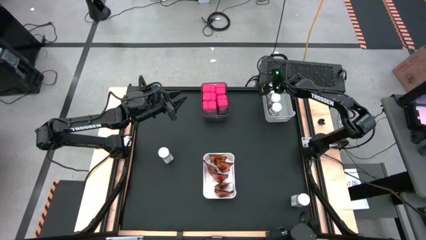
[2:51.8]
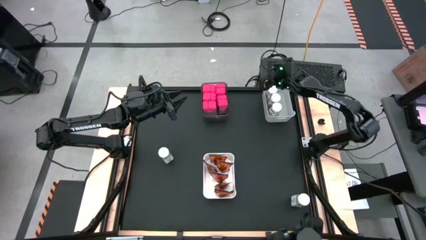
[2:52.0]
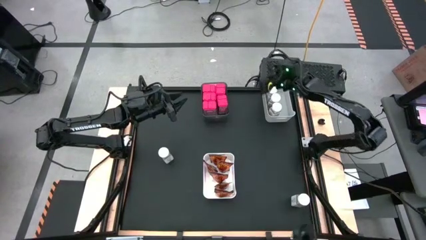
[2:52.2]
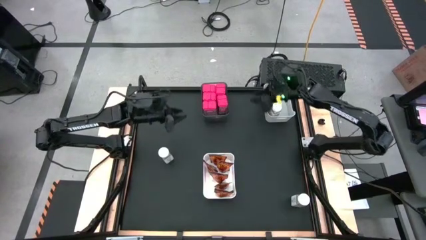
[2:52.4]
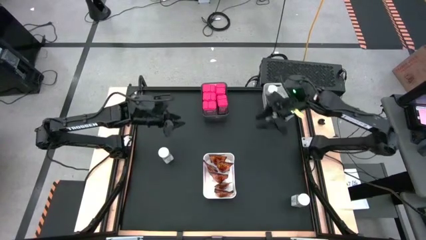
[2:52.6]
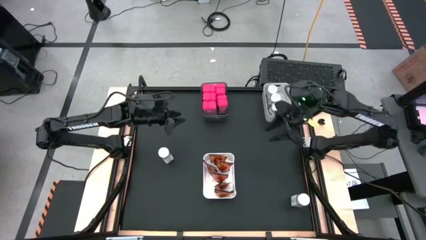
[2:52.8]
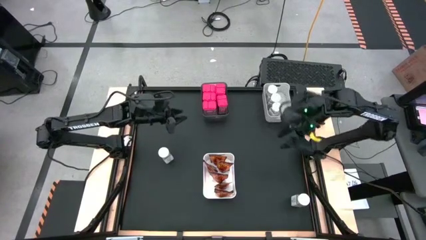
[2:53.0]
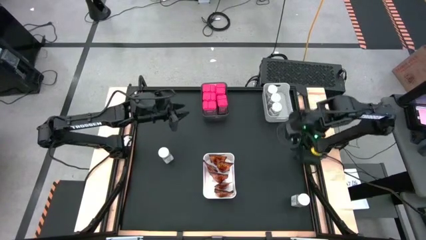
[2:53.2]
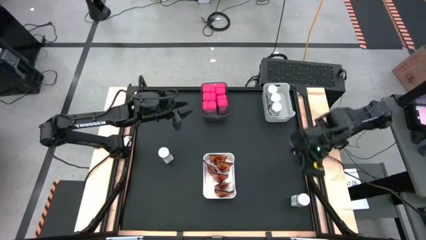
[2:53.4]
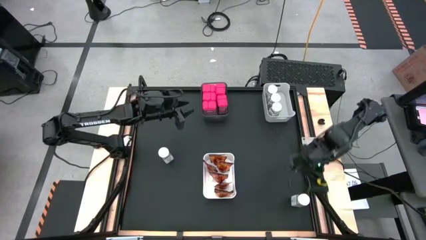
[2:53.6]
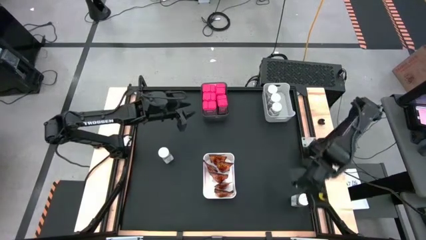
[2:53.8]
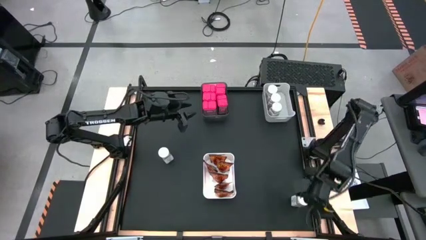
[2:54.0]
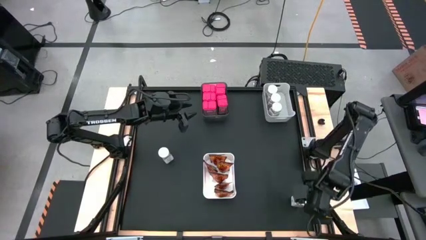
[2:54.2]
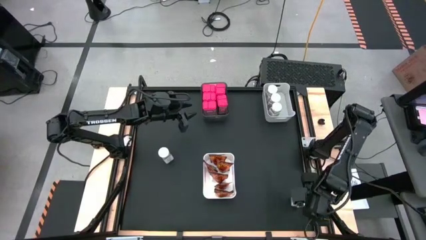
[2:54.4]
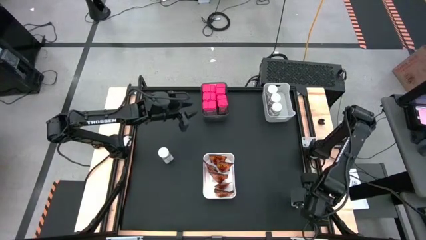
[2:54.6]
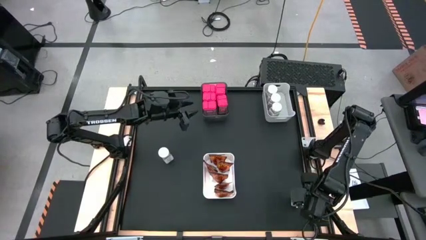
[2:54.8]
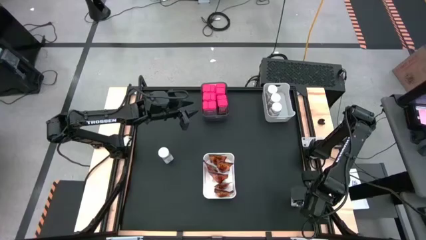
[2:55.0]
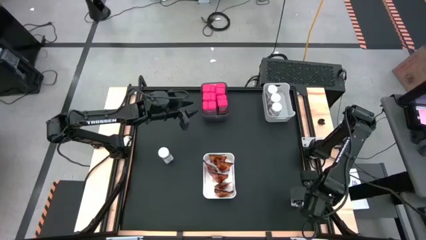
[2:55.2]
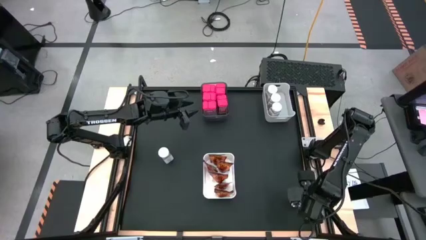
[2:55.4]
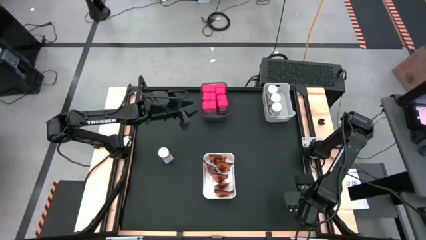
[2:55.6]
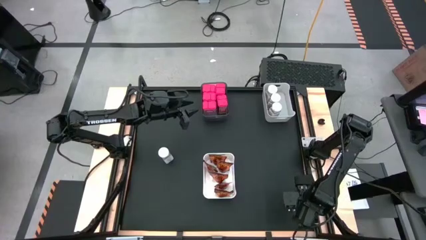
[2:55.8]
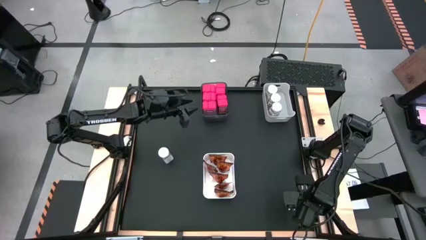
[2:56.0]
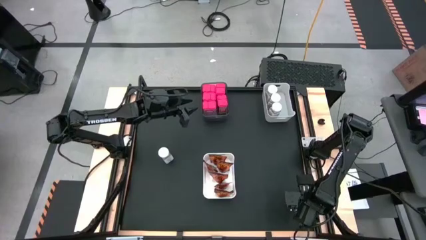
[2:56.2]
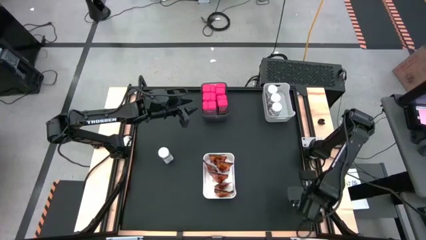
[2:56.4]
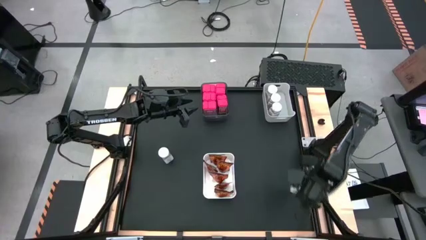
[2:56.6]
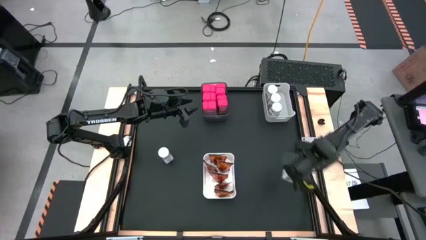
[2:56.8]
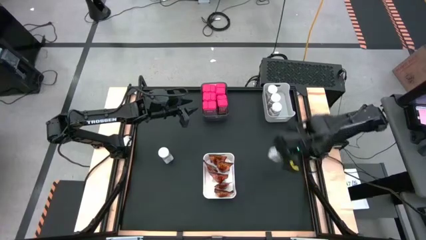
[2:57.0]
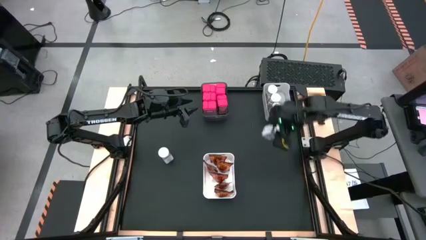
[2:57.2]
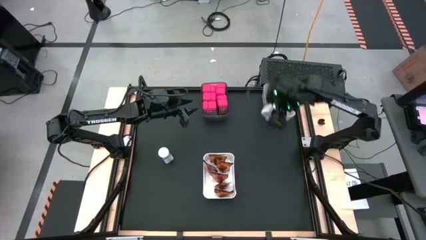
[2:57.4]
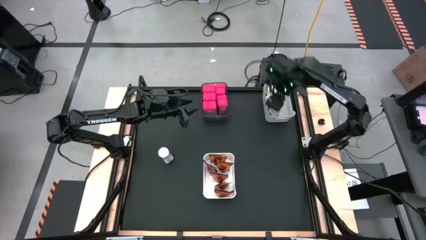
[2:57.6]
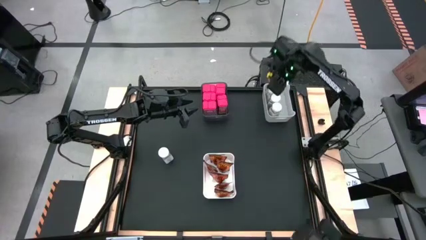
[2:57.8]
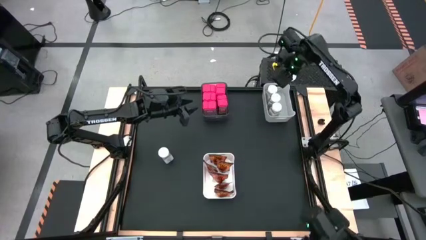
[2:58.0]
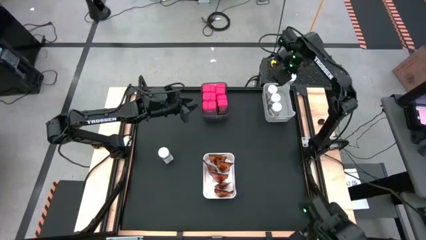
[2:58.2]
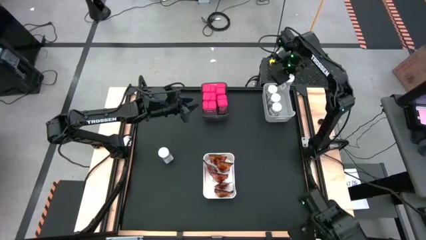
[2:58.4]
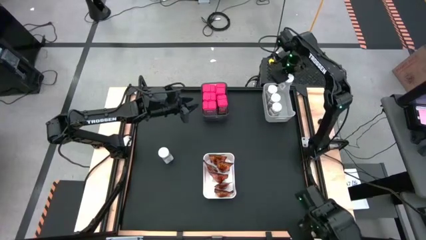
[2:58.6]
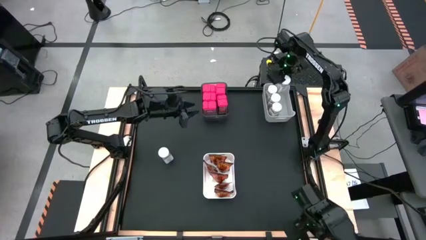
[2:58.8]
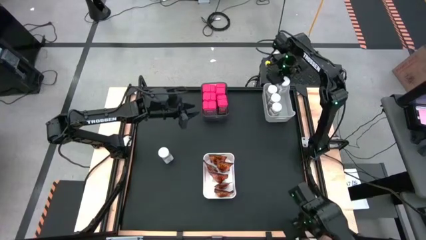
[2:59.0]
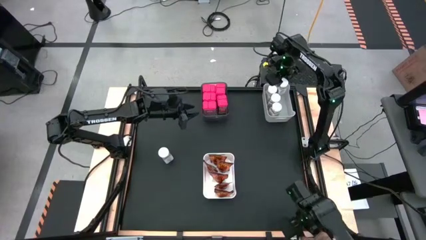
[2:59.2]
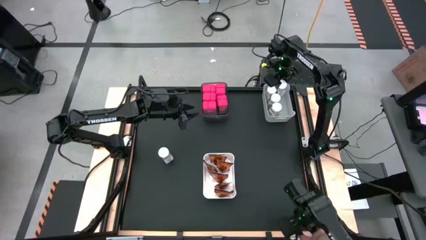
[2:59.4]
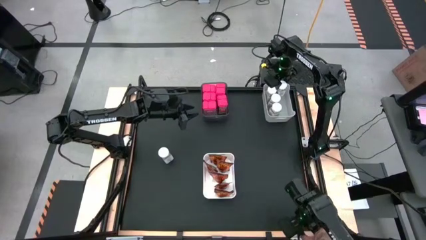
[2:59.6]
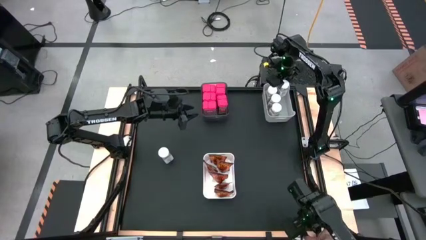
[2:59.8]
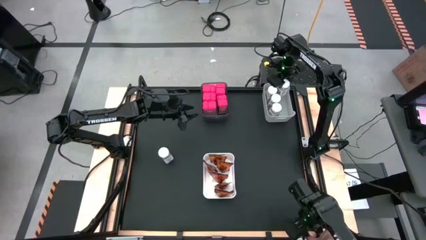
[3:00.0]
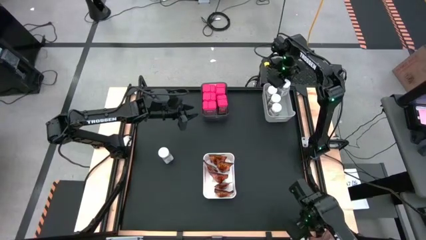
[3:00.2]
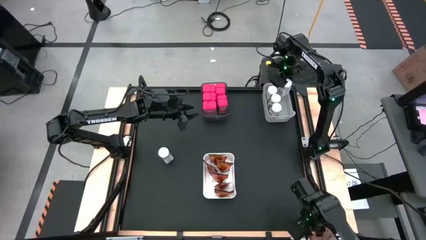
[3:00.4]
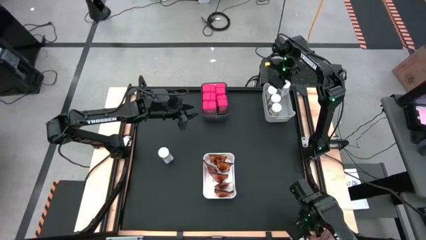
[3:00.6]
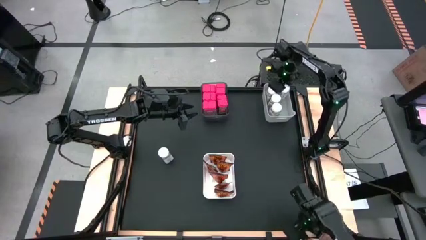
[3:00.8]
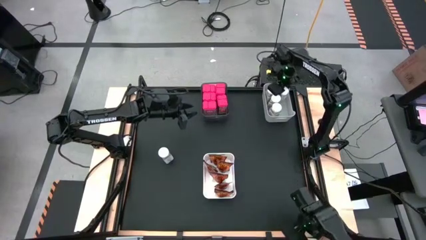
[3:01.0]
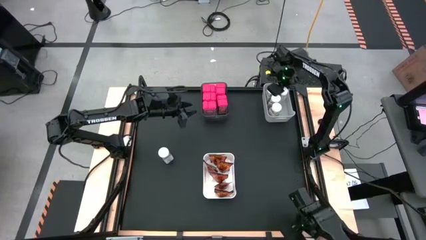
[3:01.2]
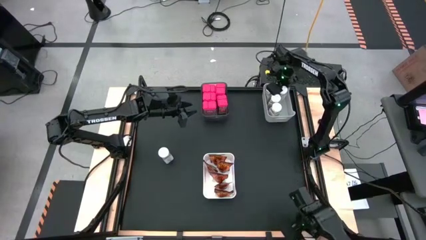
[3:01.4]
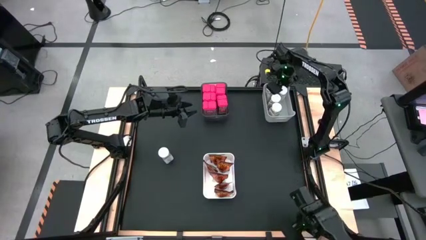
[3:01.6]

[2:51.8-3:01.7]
Task: Sort spices by type
Put the white seasoning bottle into the gray bin

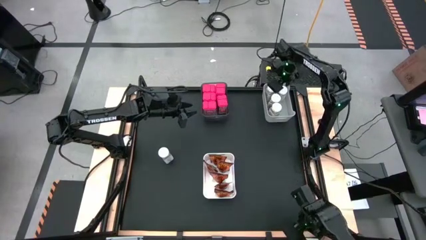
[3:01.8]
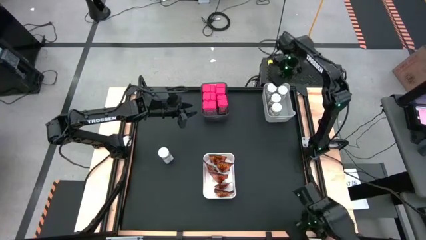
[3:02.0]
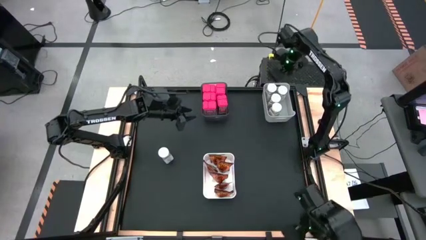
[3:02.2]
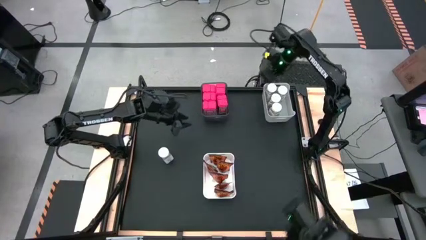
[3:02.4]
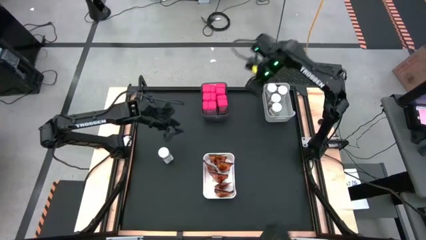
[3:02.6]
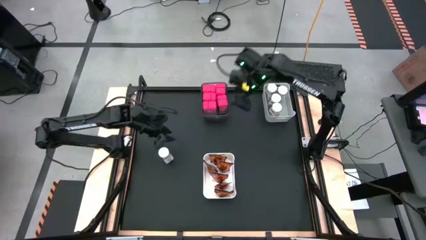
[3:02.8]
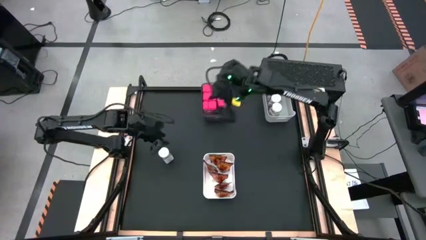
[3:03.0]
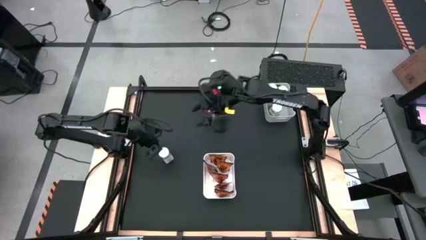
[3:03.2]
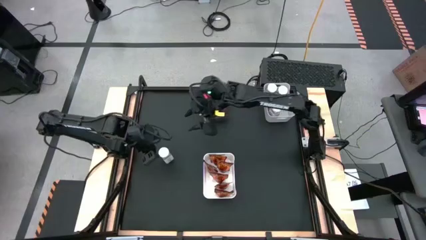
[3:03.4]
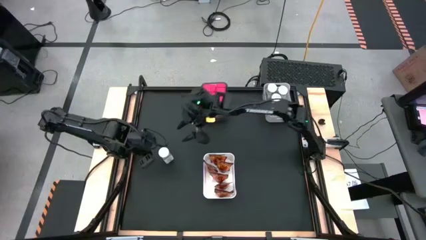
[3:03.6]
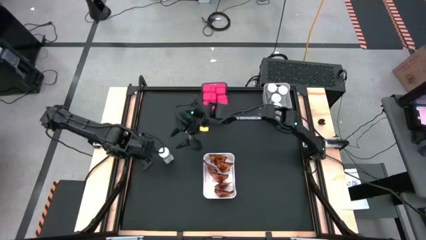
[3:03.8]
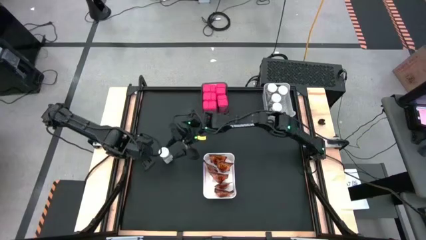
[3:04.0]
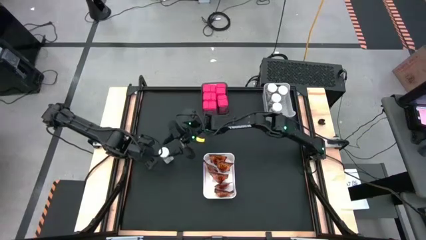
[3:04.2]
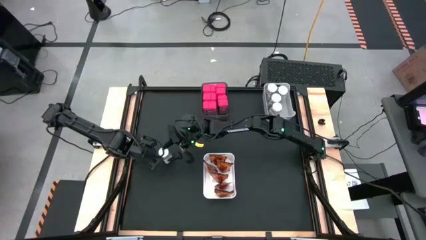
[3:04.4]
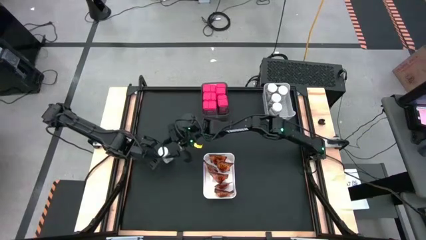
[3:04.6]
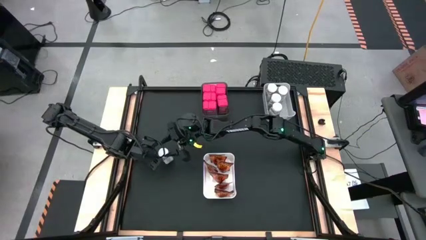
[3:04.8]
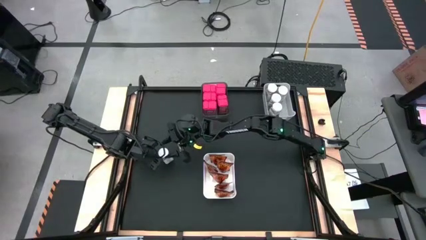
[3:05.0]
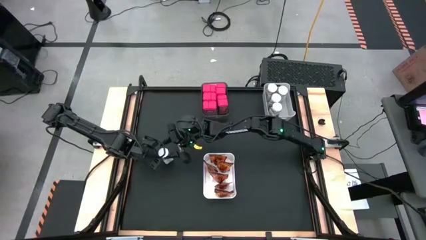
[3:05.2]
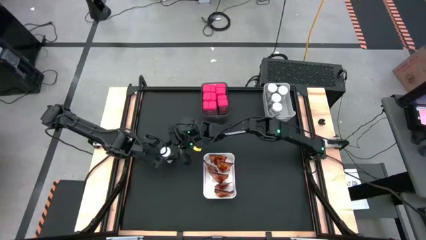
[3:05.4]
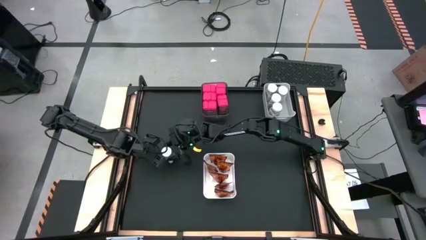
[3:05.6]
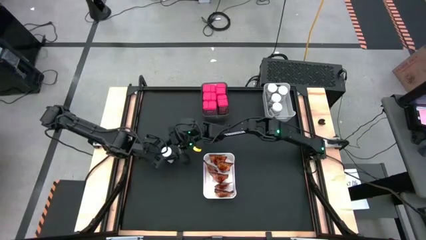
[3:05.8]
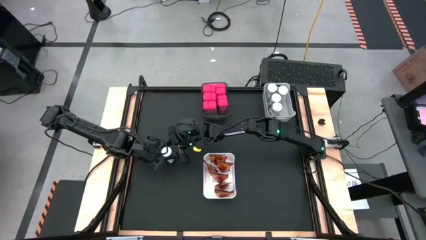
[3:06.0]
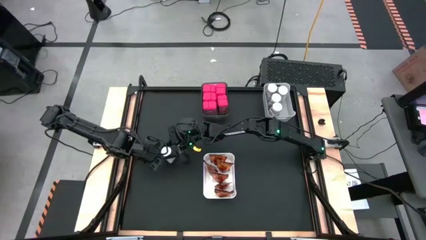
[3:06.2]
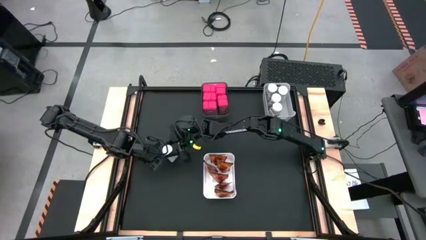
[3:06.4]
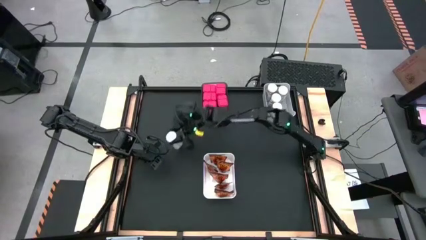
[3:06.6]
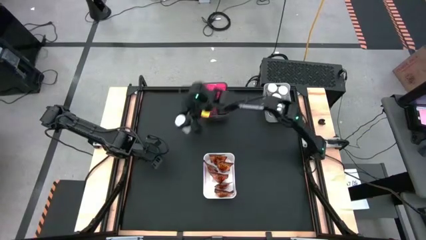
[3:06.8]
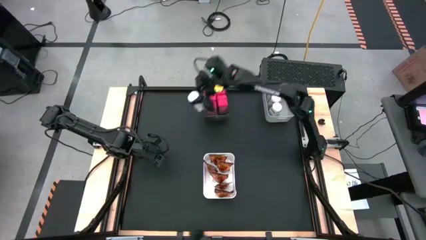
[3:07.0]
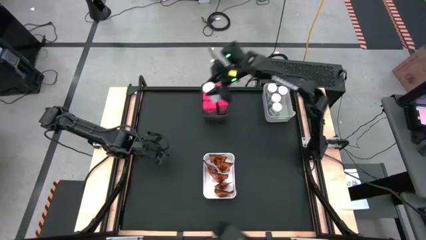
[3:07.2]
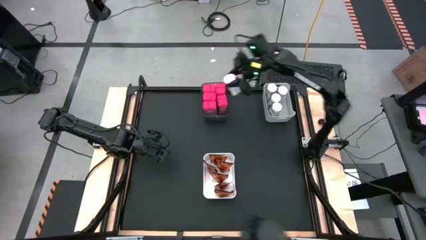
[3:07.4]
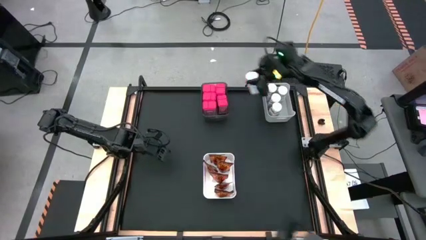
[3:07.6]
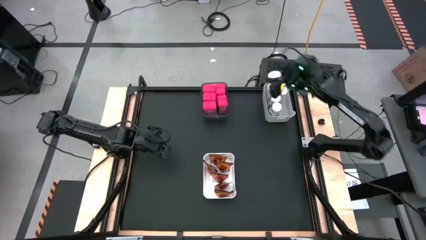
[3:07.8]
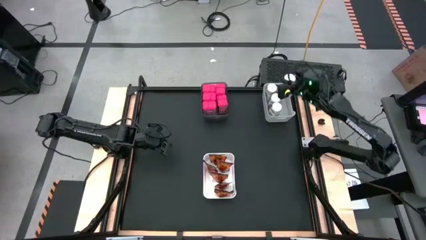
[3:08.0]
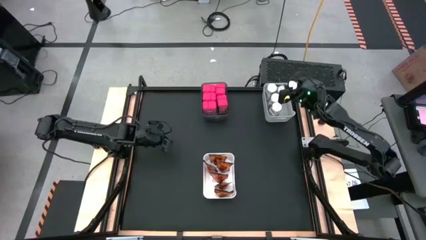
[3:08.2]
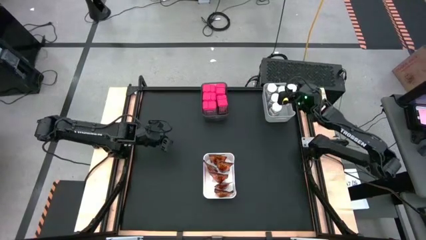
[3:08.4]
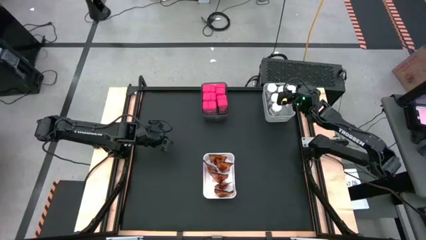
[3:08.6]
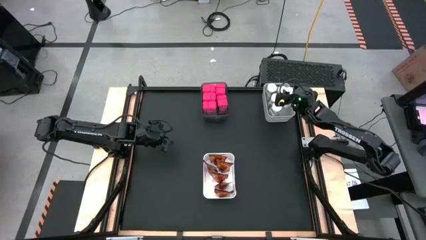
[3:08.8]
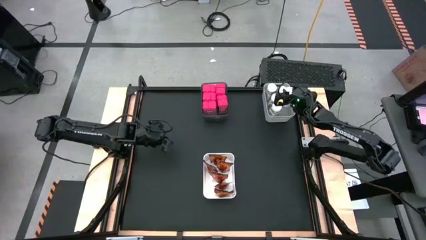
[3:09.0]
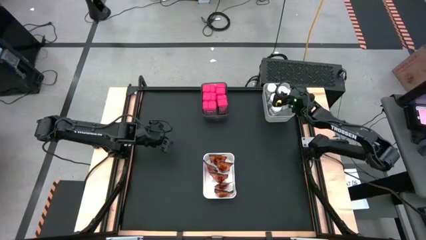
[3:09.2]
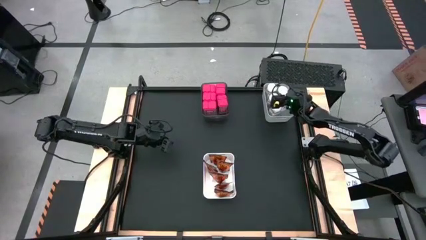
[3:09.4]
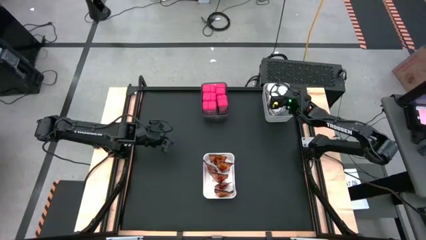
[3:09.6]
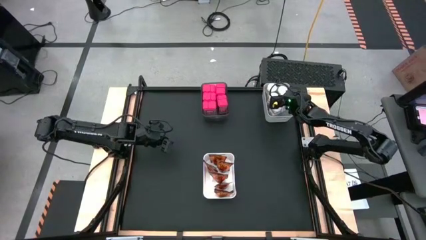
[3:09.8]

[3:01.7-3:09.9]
Put the white seasoning bottle into the gray bin
